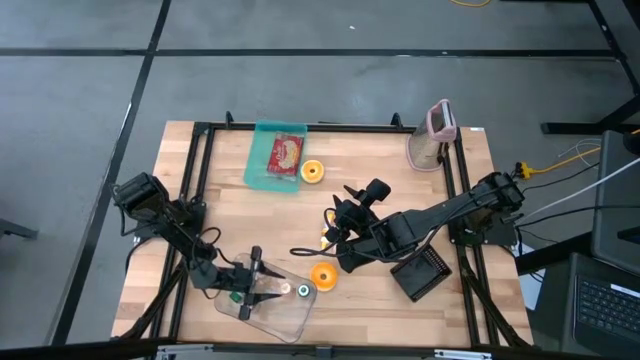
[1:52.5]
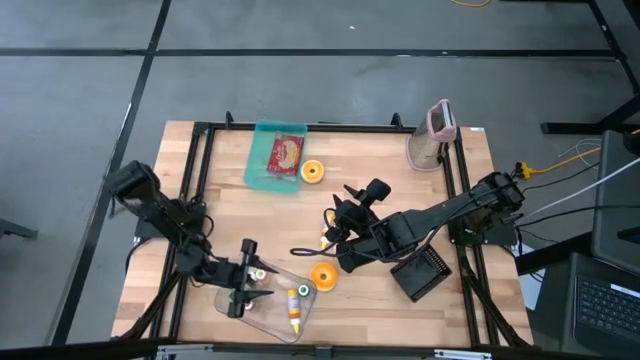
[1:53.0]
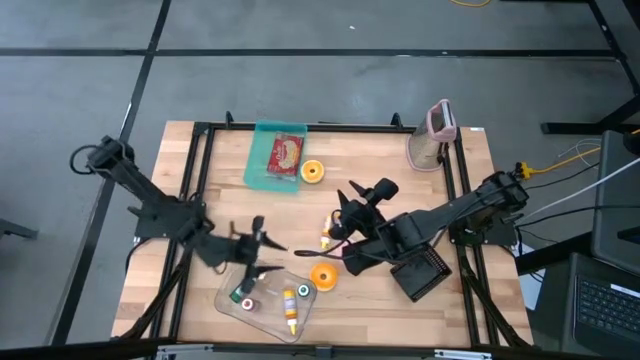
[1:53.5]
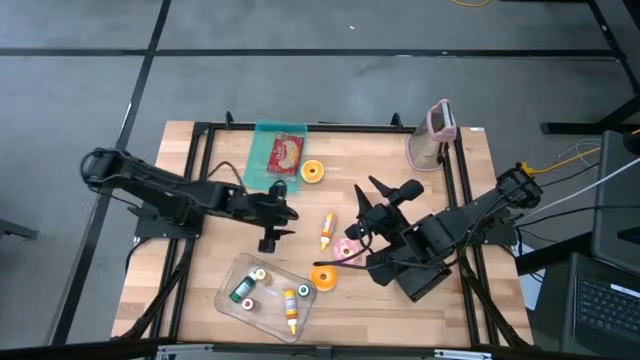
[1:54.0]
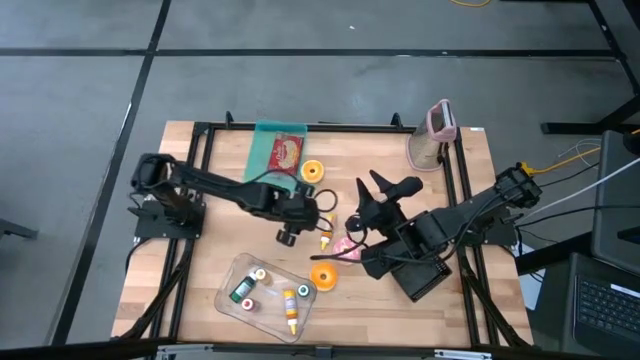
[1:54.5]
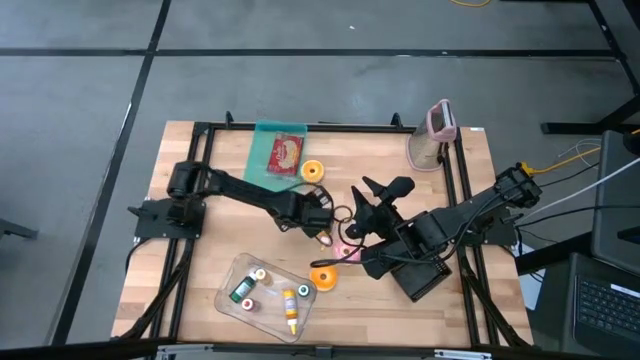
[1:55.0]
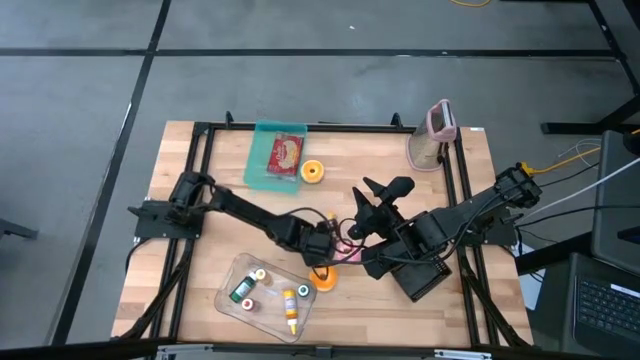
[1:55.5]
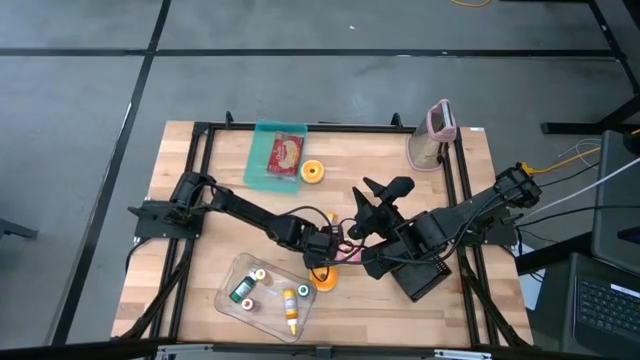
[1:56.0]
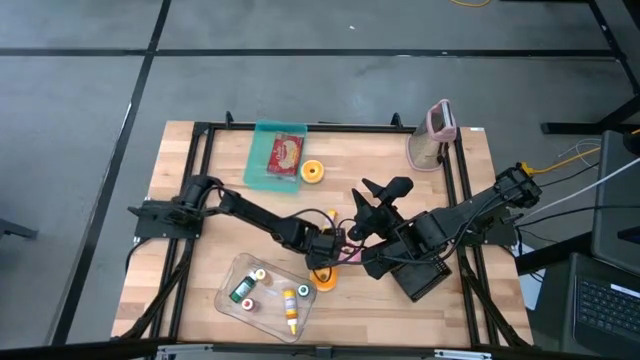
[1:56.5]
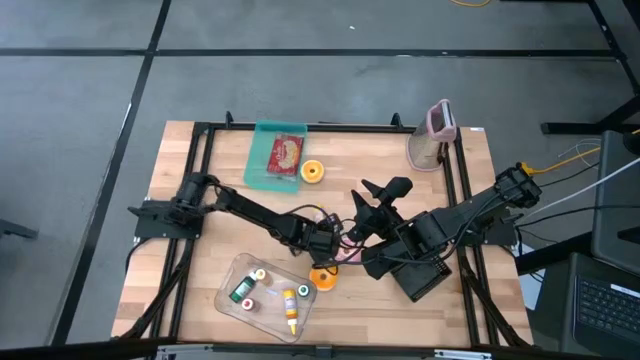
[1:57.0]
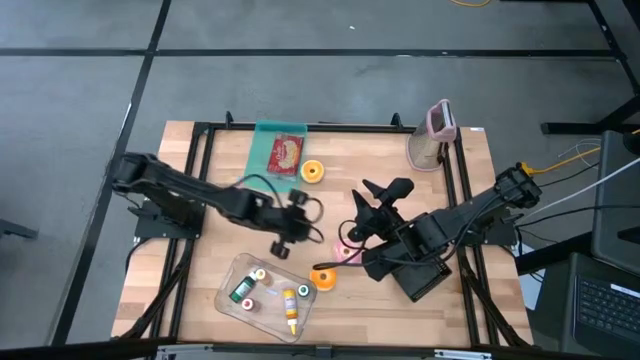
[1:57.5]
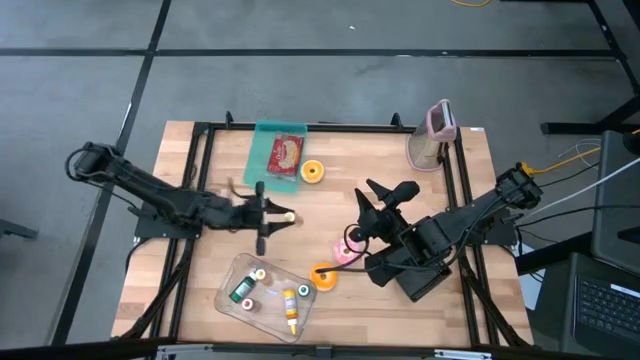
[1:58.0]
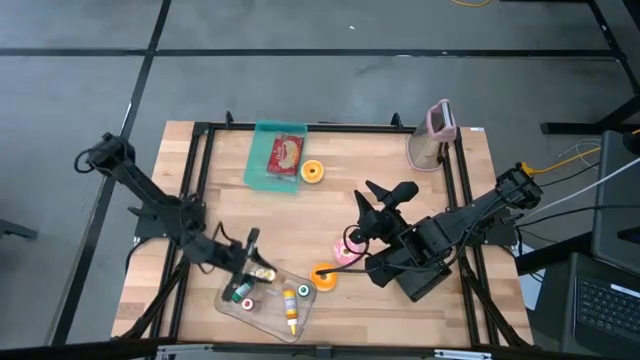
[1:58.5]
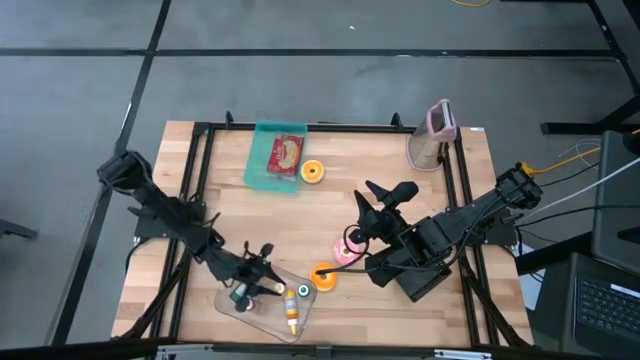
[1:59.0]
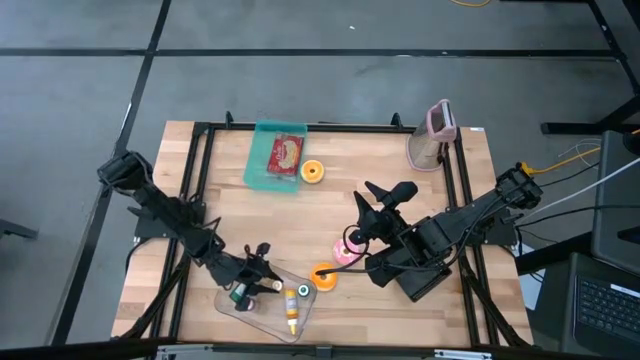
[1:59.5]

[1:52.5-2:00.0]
Put the yellow food coloring bottle into the transparent bin

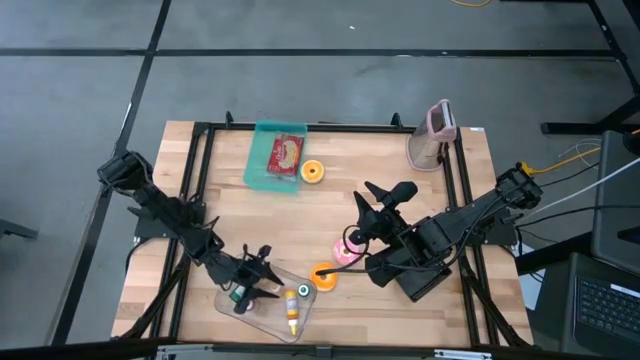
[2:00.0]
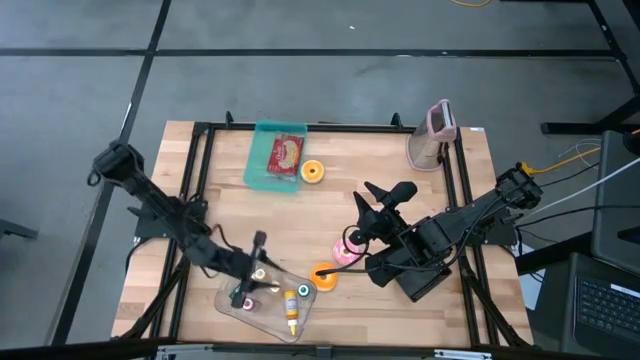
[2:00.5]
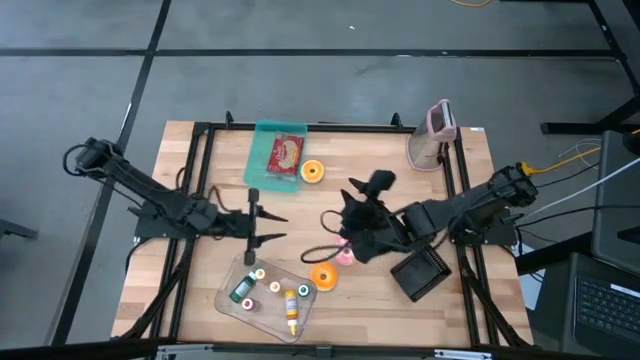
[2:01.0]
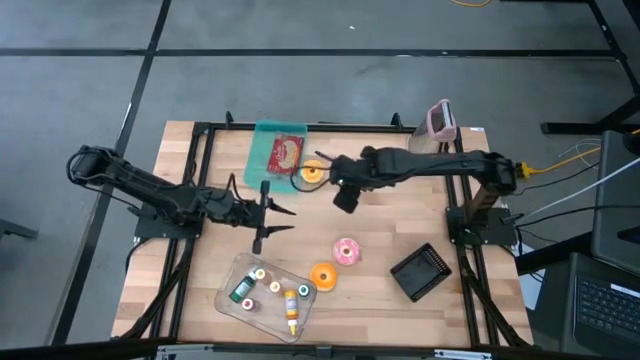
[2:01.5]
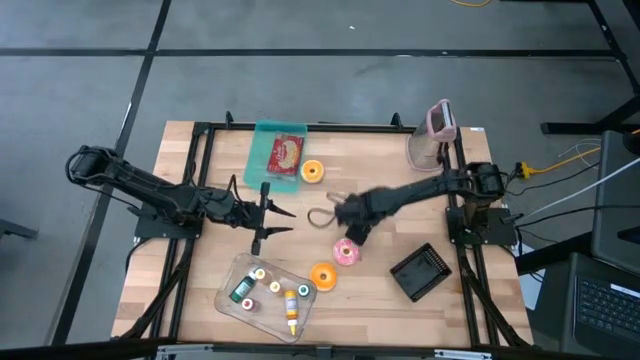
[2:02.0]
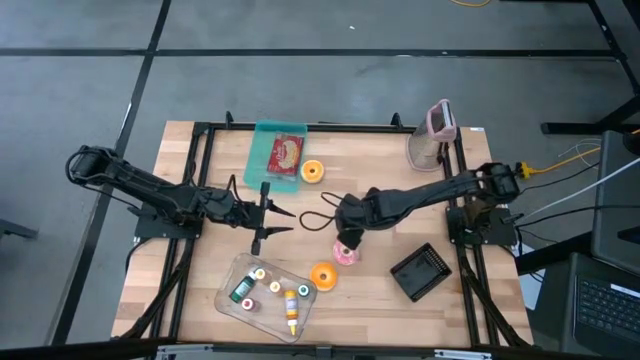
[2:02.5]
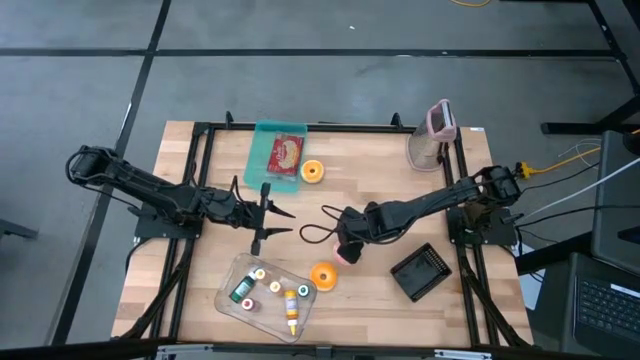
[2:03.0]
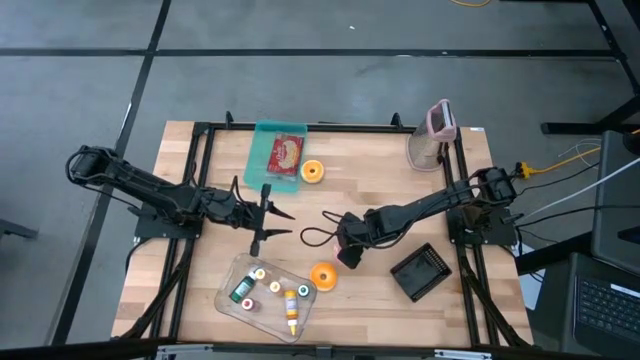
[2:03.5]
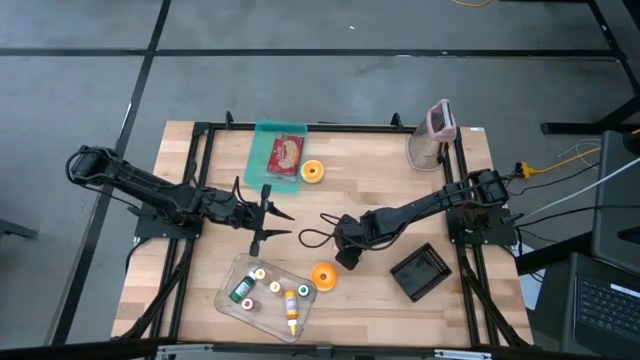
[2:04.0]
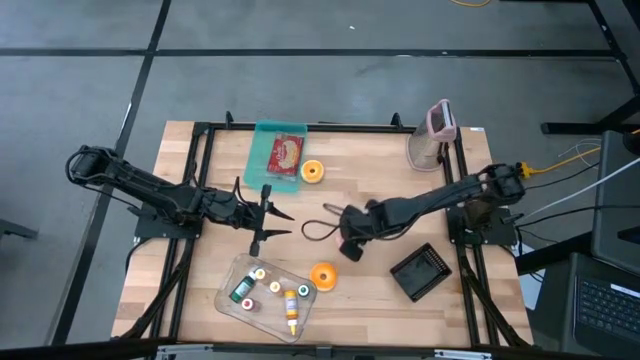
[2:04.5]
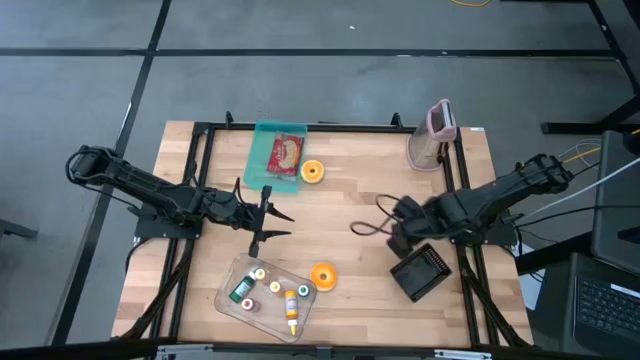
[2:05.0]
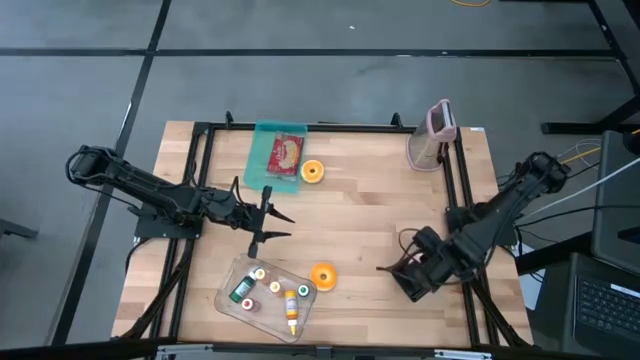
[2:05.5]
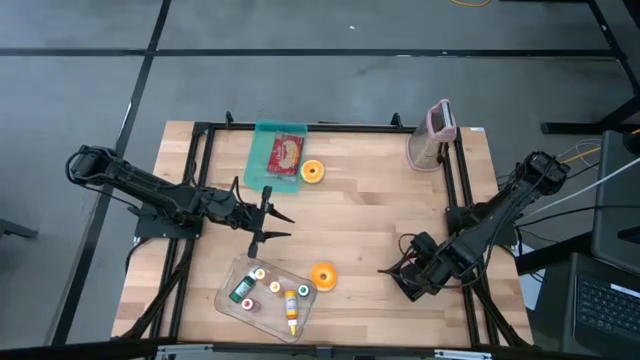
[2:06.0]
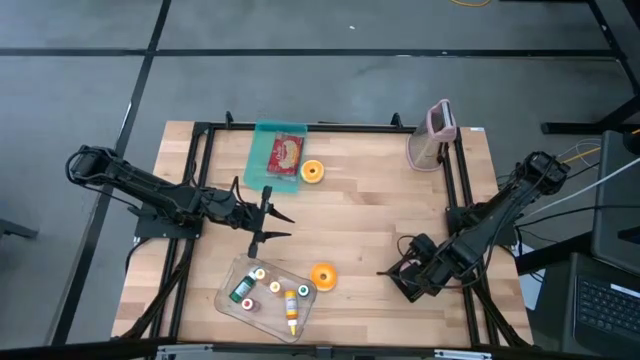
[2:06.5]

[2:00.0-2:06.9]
Put the pink donut into the black basket

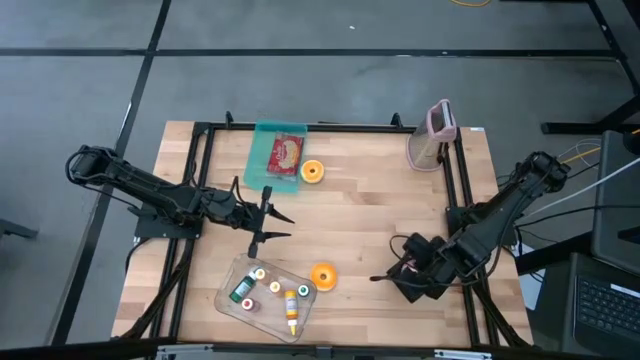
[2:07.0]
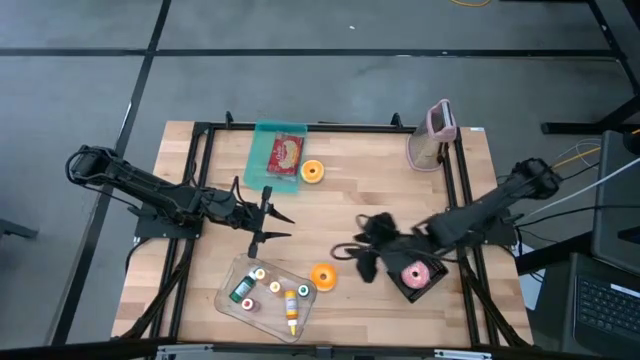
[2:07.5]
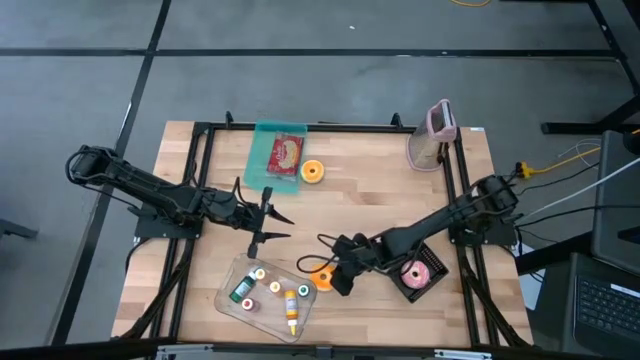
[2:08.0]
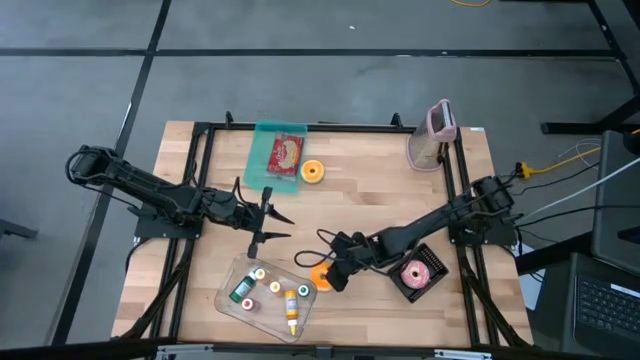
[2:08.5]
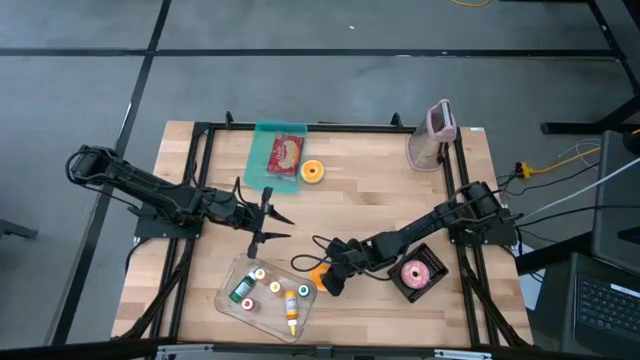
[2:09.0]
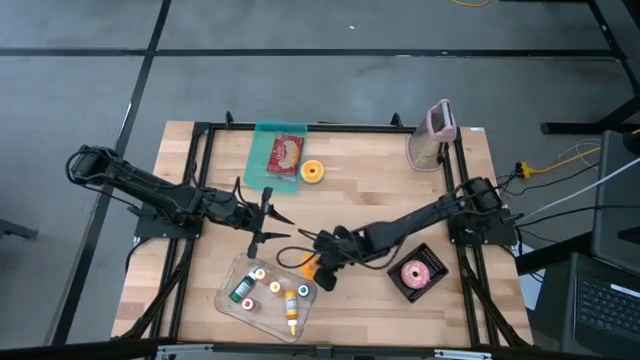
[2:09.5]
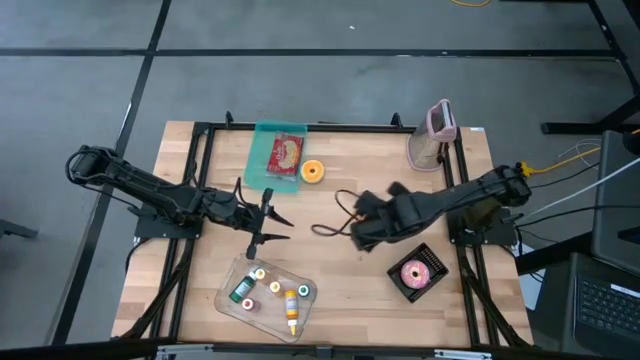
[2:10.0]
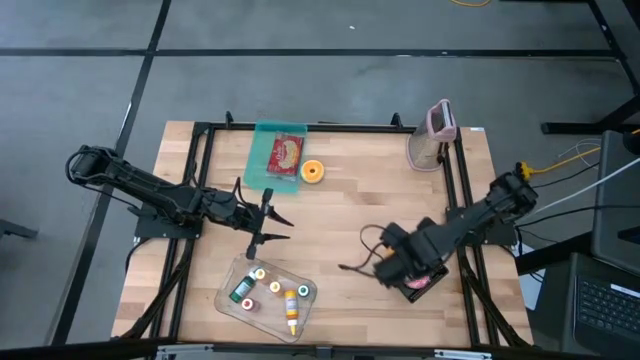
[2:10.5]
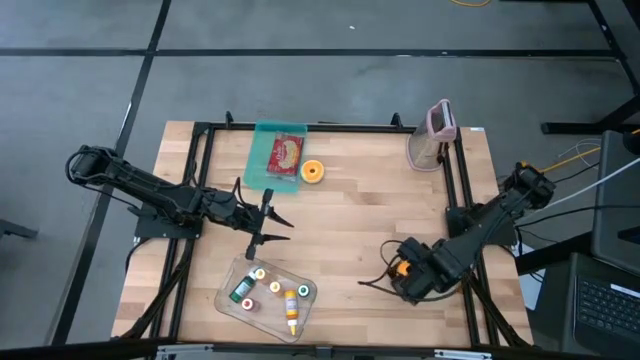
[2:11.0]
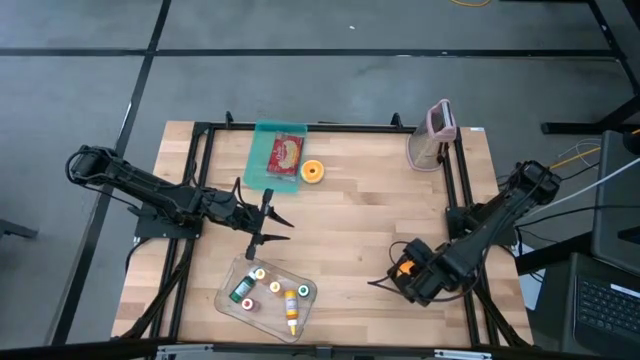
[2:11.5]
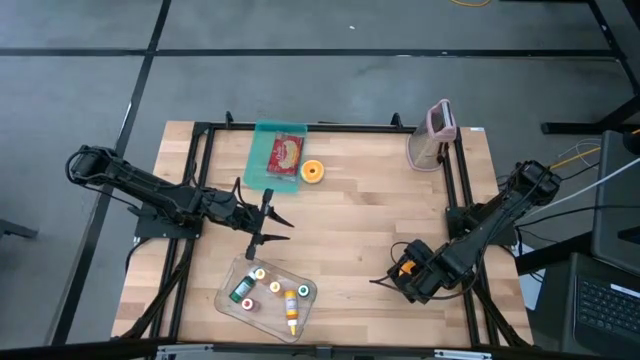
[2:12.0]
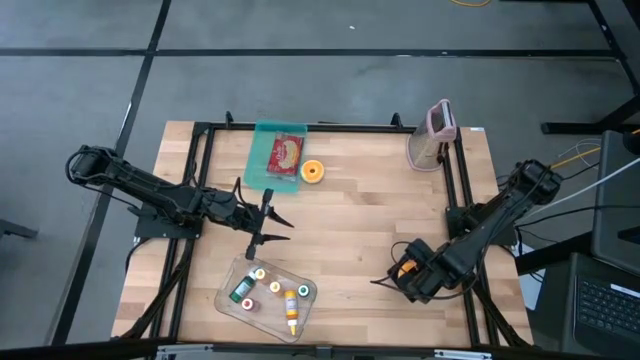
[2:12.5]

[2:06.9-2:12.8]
Put the bottom orange donut into the black basket
